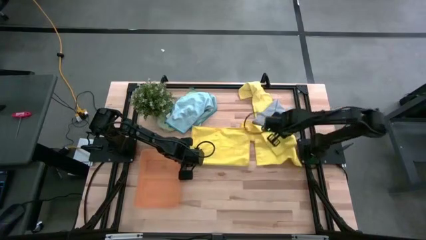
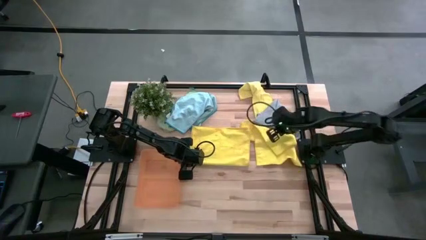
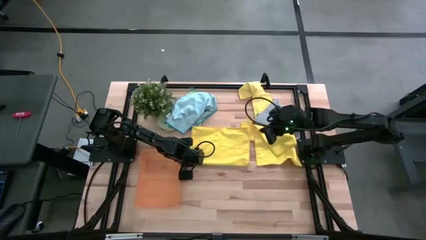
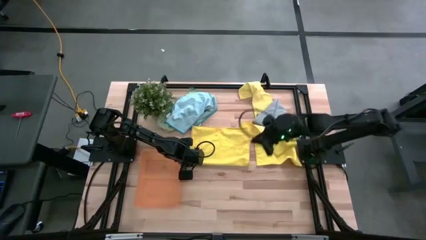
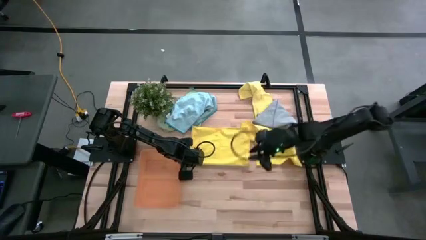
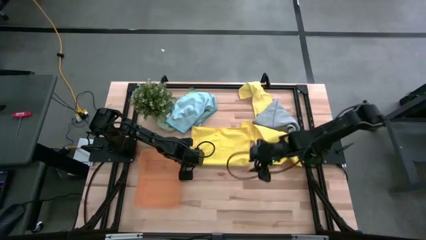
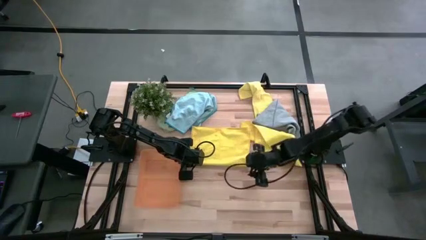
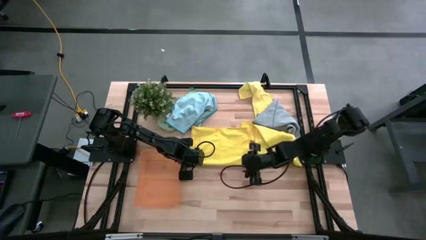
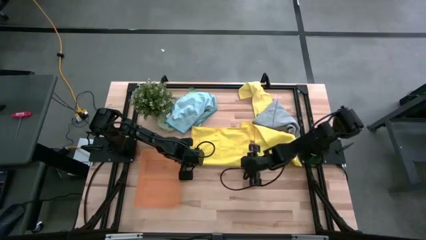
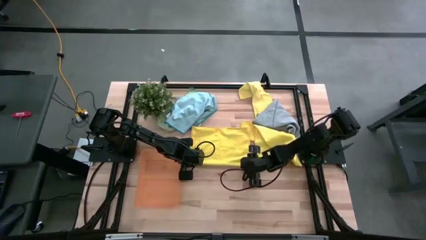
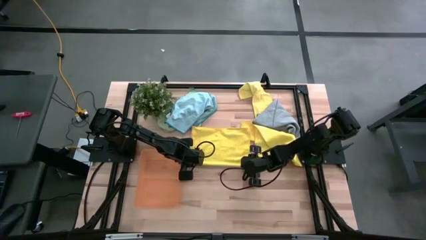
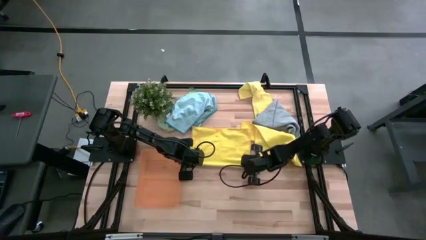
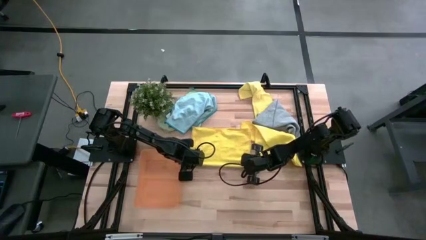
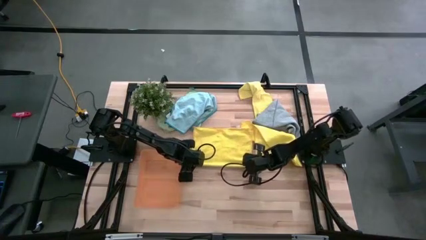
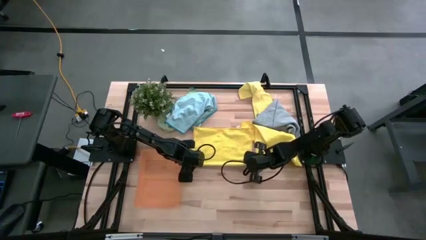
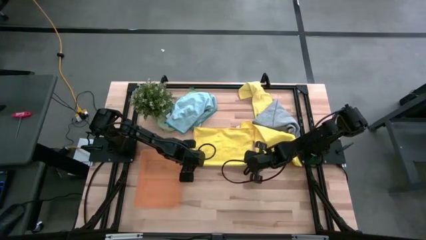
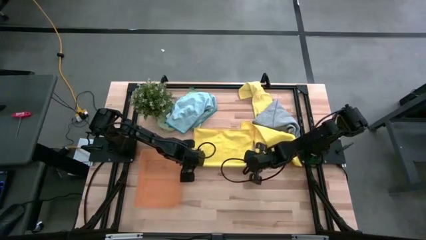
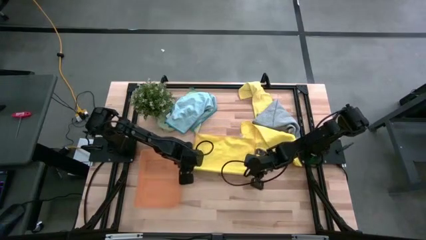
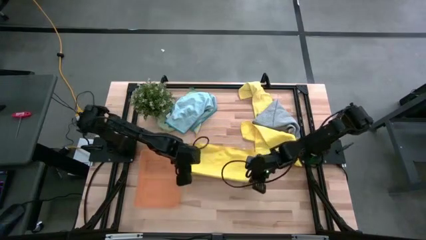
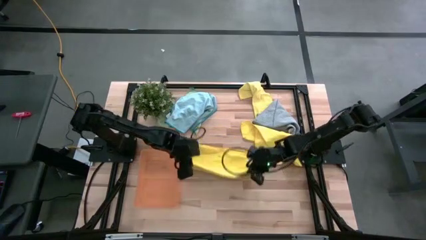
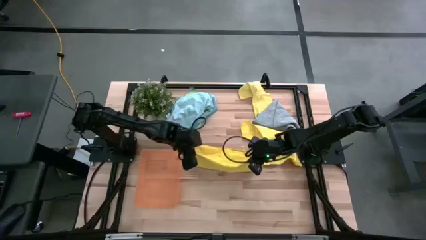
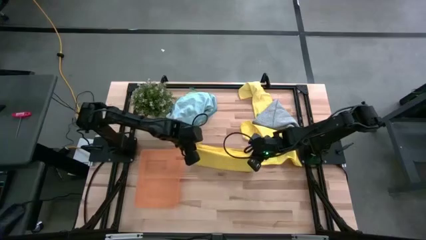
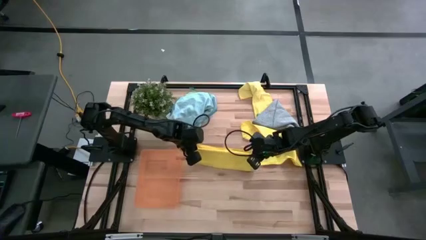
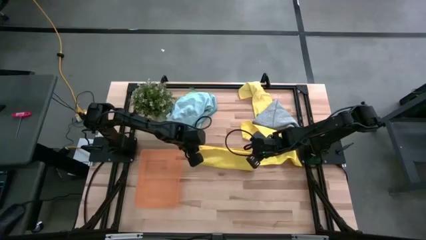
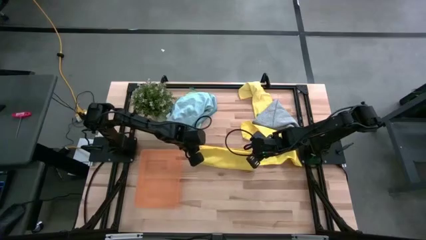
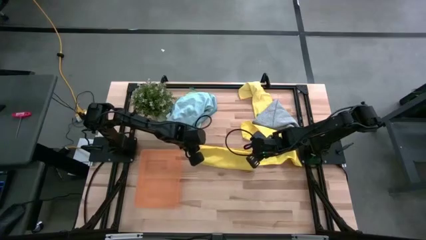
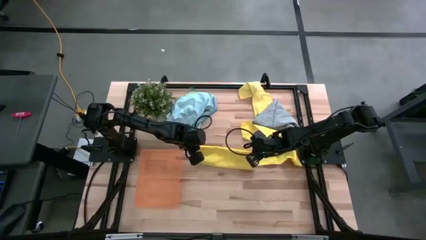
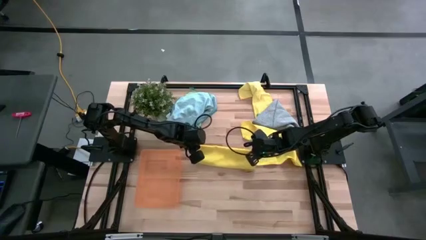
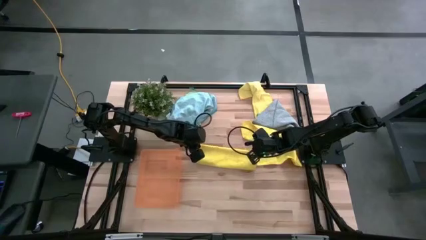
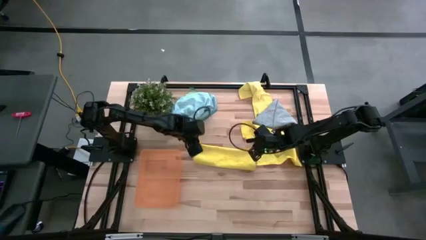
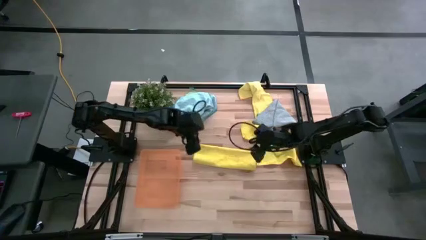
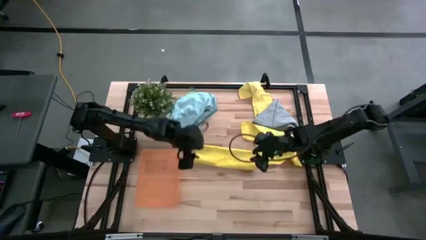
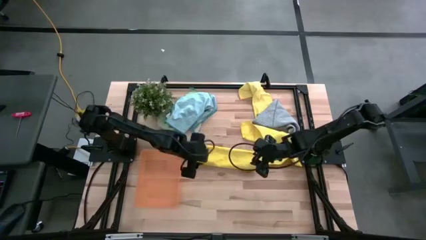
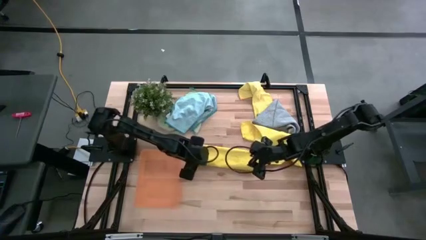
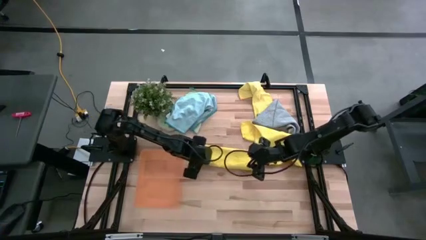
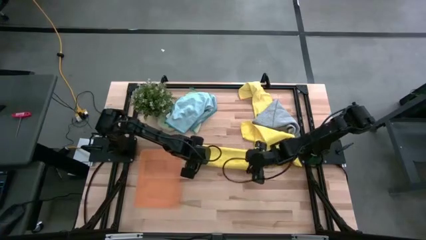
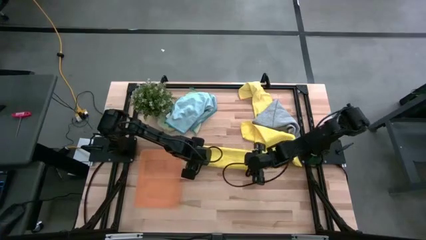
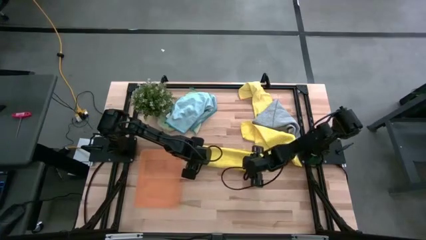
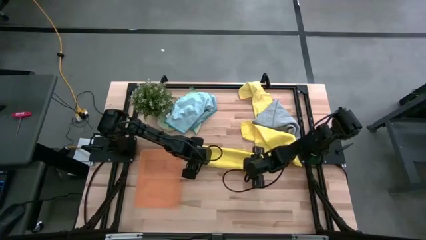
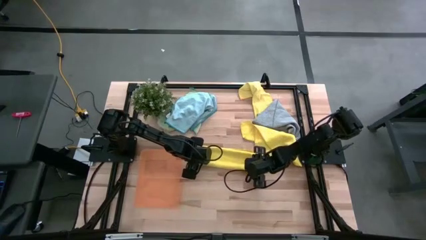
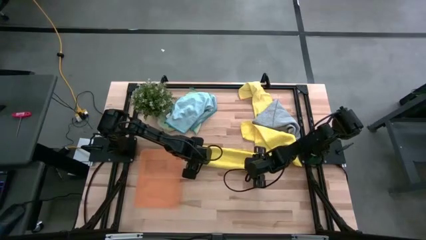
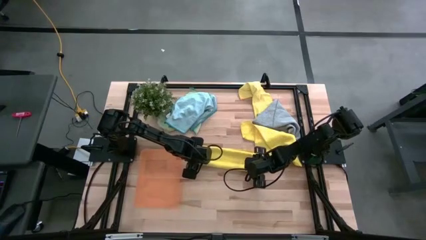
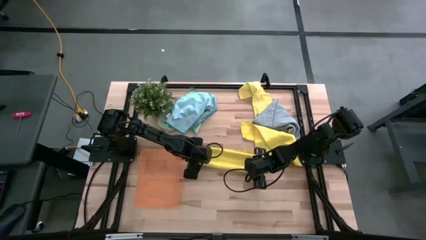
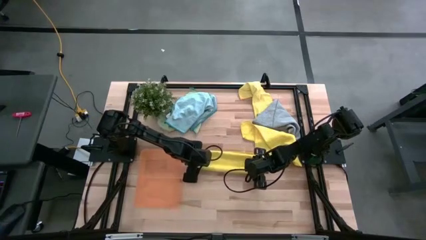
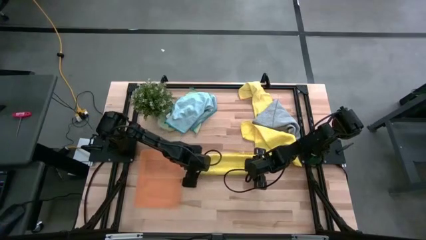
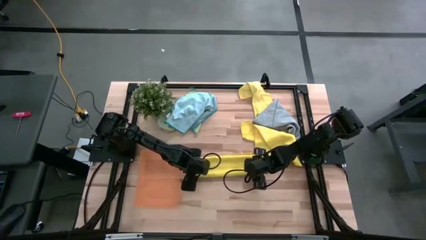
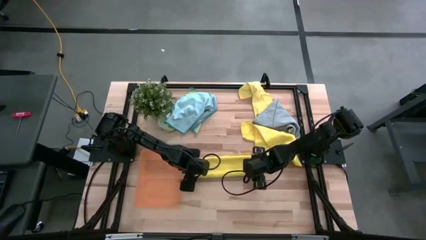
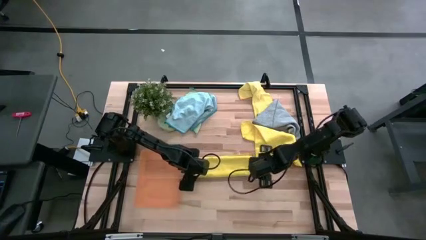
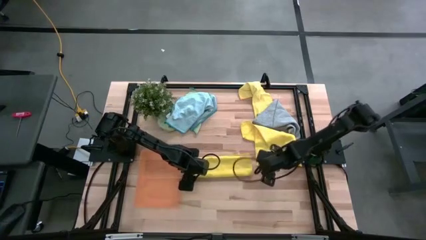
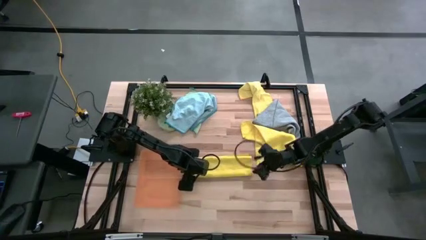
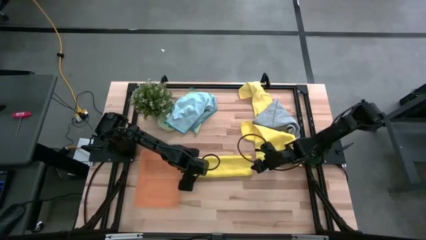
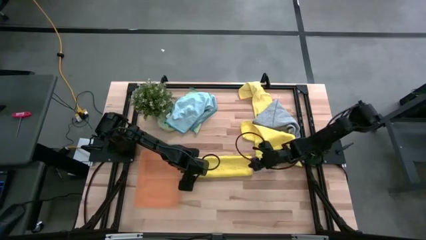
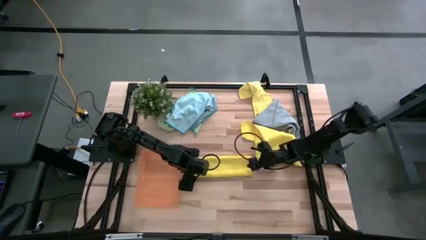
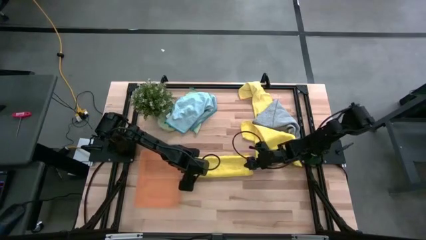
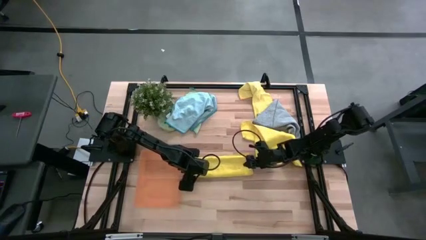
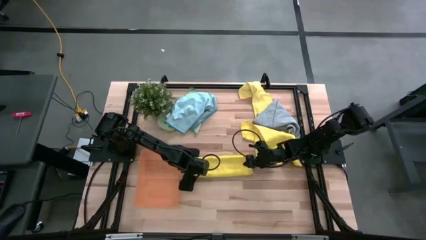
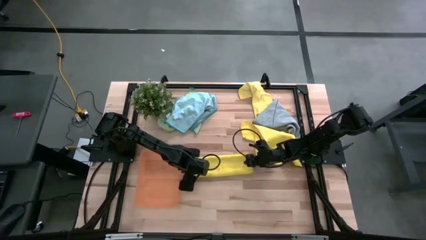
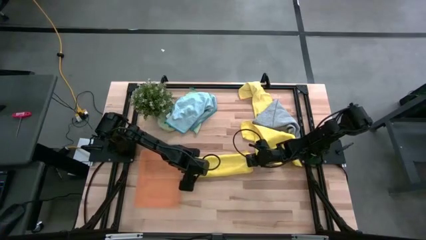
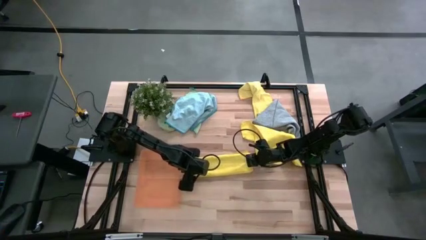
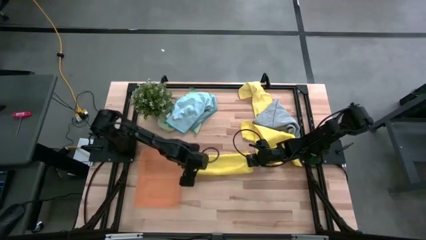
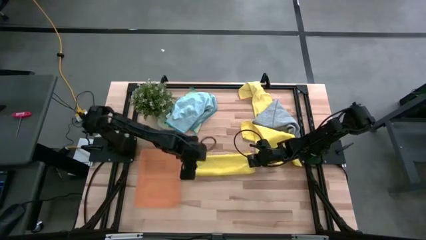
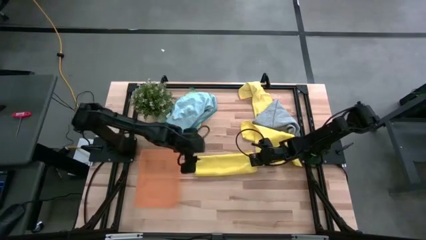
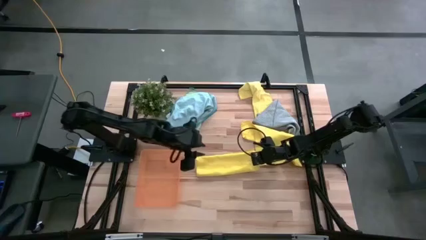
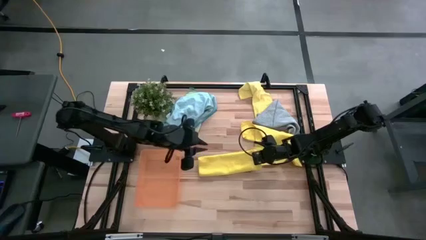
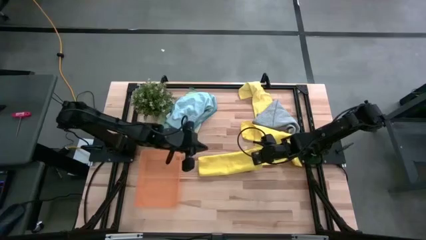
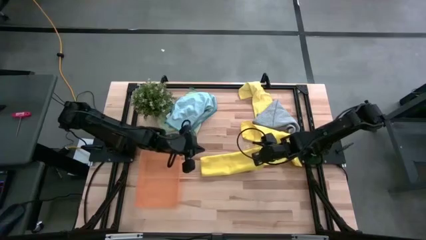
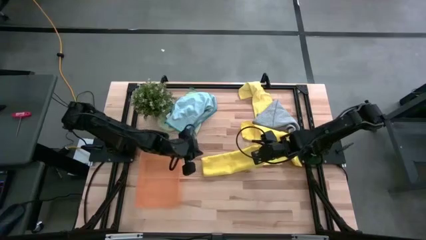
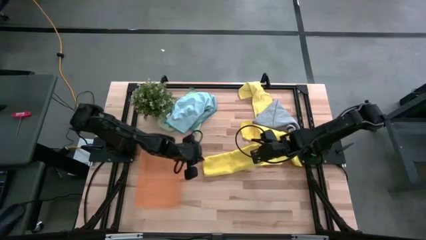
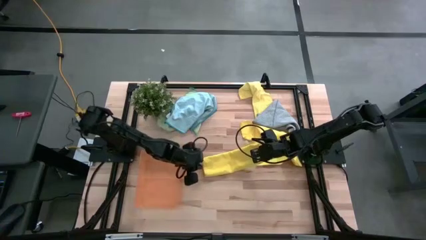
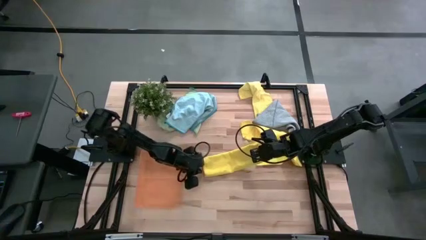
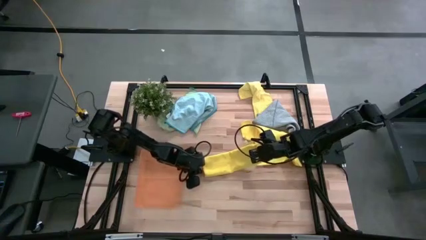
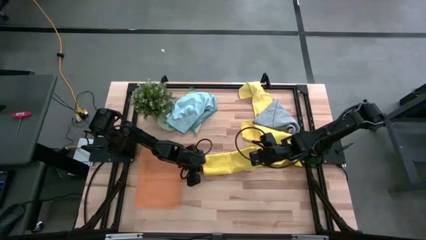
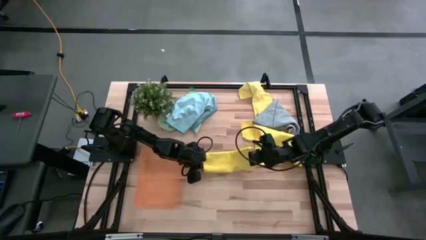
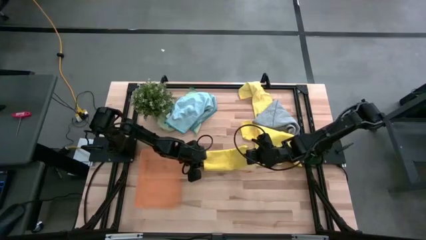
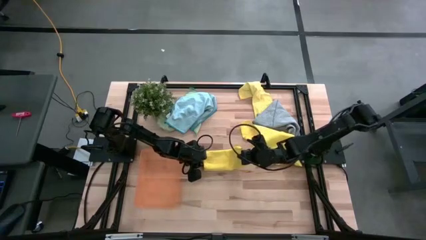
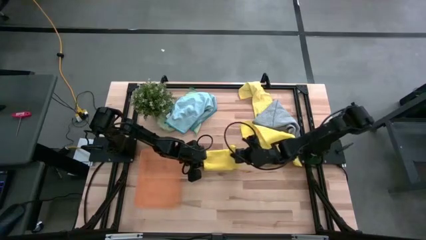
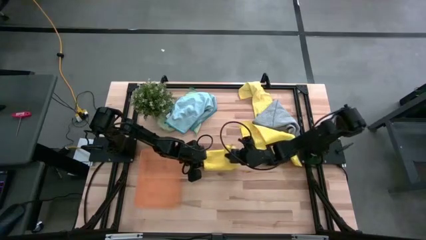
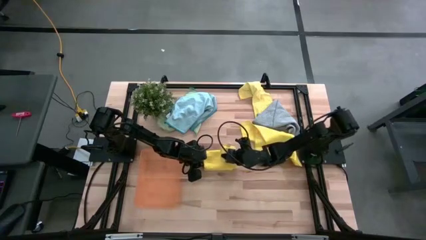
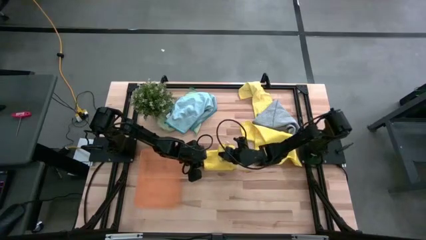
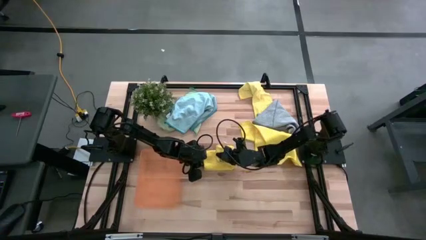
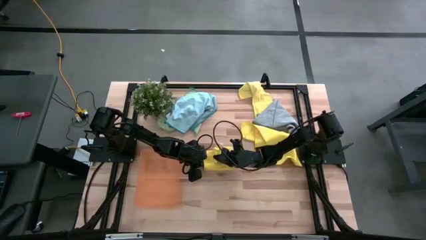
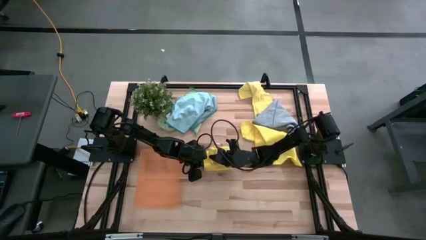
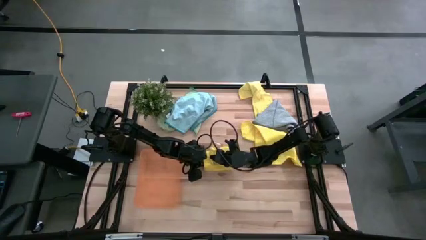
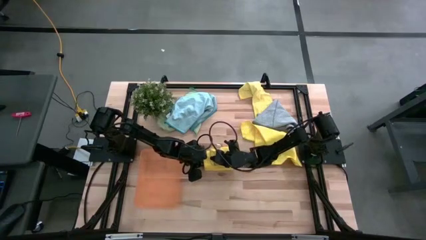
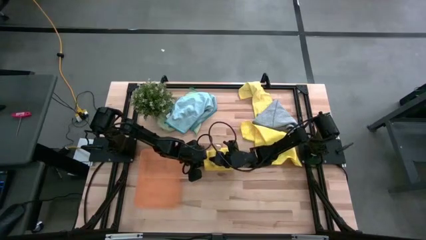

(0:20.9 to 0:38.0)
Task: Fold microfiber towels
Fold the bottom yellow microfiber towel
